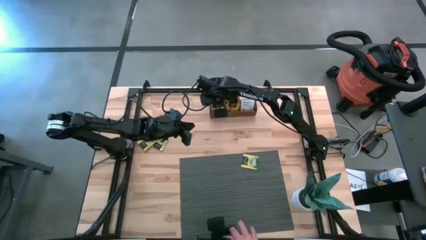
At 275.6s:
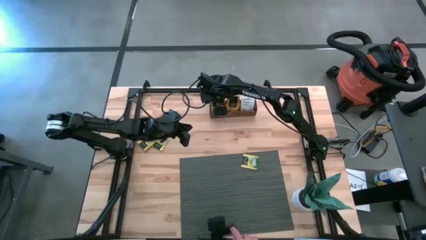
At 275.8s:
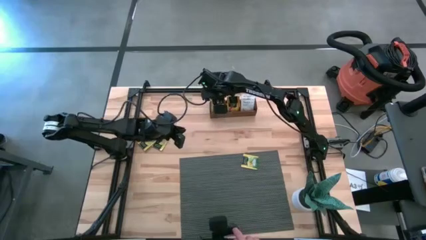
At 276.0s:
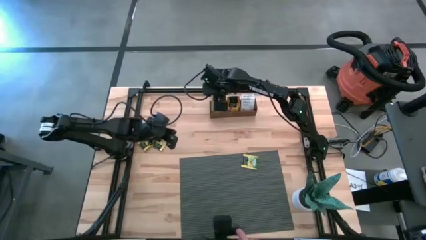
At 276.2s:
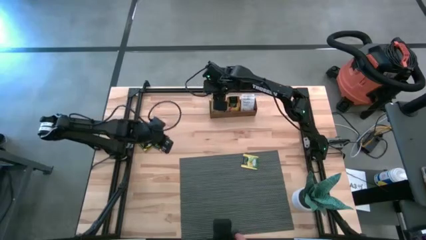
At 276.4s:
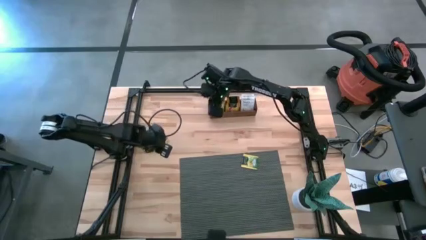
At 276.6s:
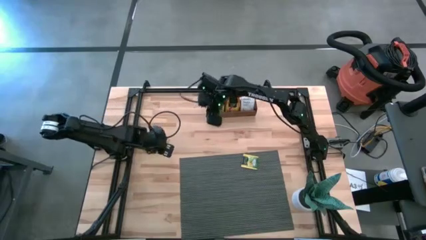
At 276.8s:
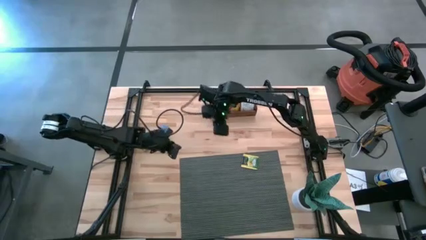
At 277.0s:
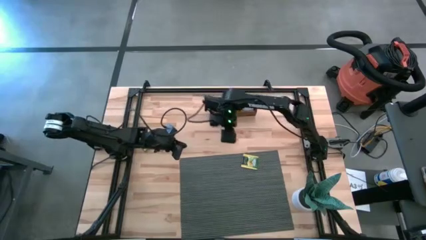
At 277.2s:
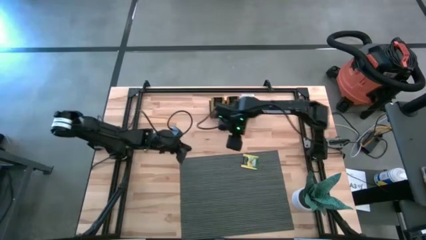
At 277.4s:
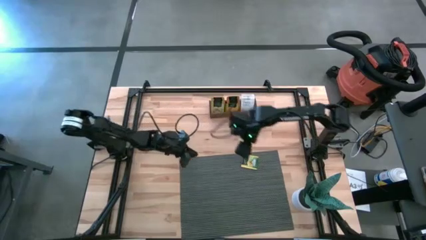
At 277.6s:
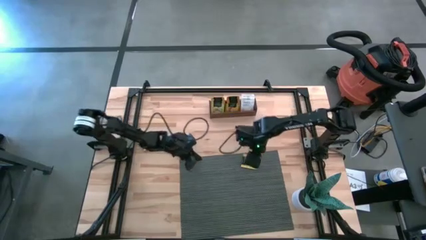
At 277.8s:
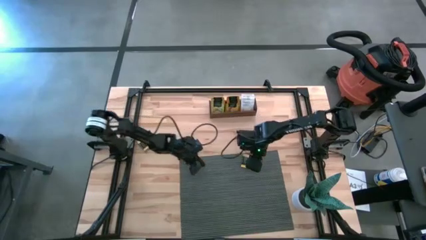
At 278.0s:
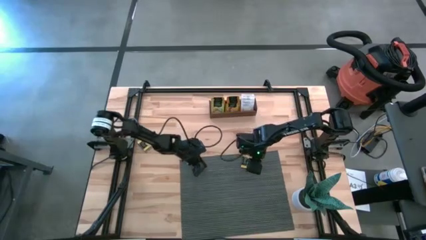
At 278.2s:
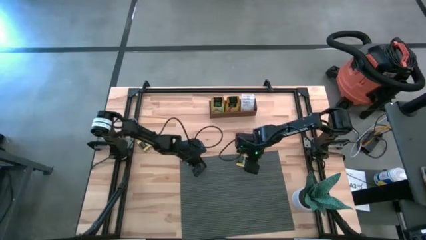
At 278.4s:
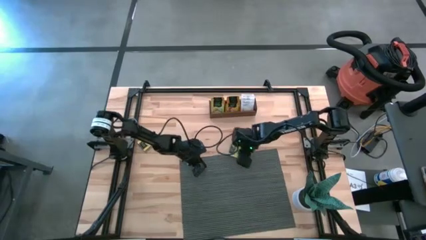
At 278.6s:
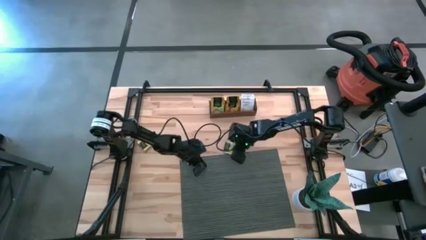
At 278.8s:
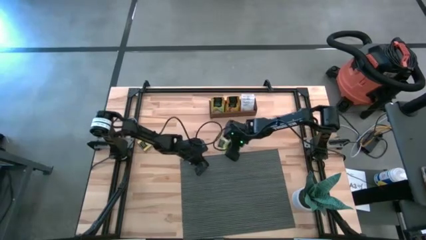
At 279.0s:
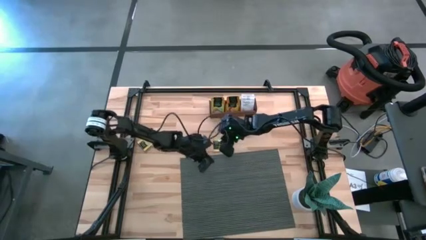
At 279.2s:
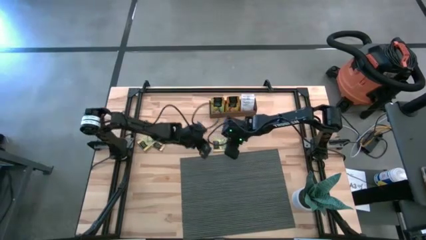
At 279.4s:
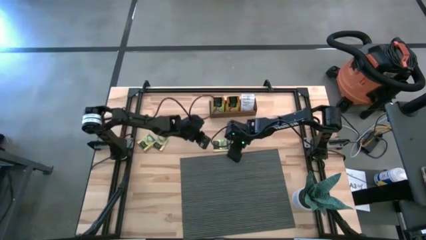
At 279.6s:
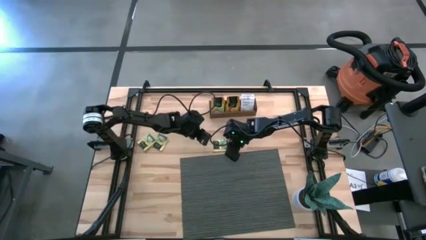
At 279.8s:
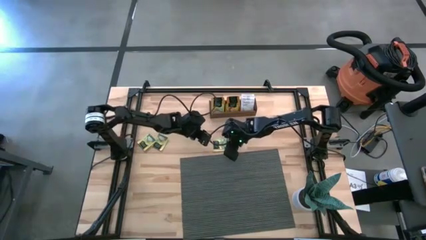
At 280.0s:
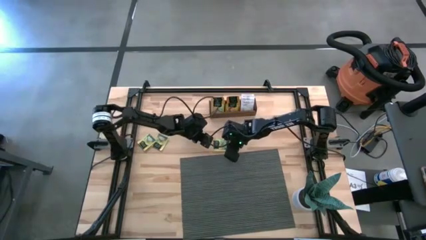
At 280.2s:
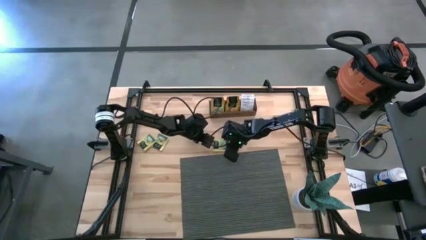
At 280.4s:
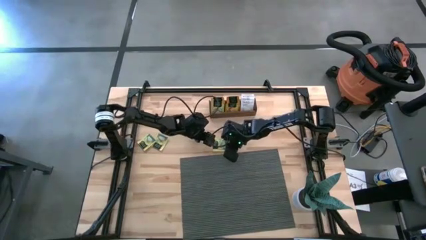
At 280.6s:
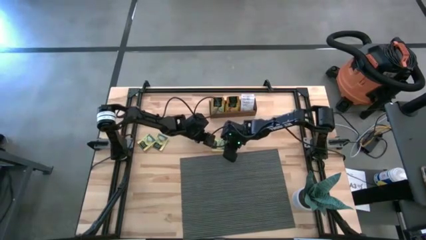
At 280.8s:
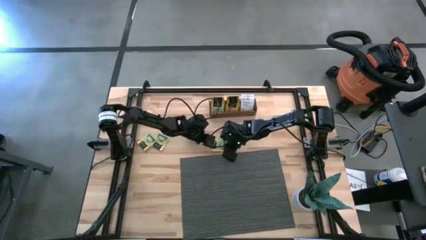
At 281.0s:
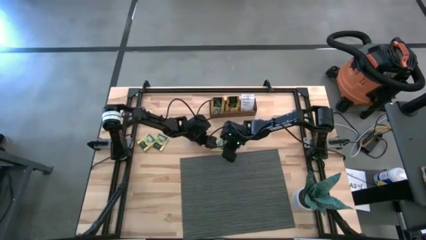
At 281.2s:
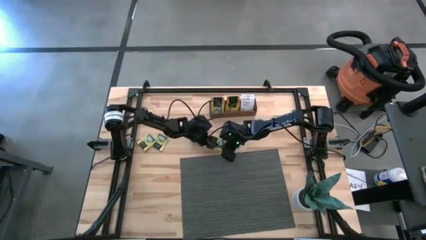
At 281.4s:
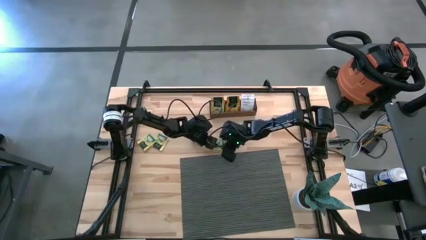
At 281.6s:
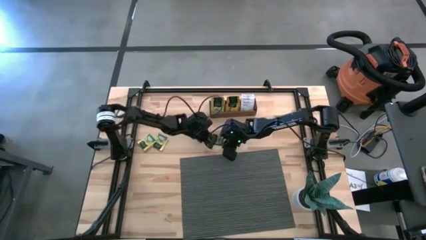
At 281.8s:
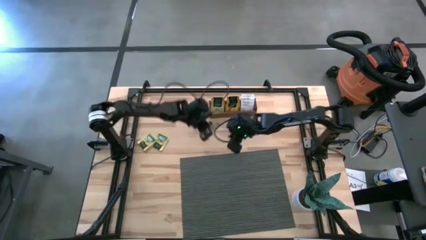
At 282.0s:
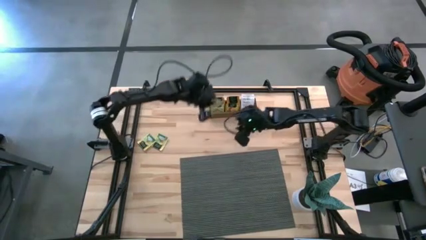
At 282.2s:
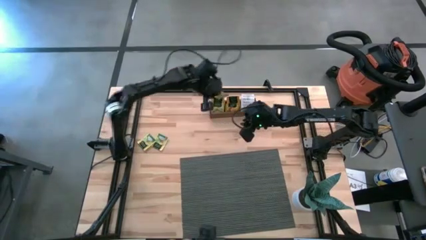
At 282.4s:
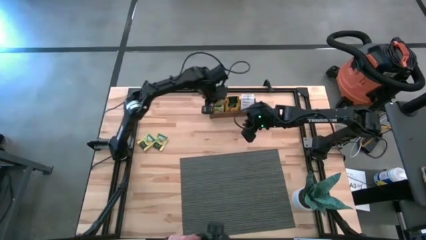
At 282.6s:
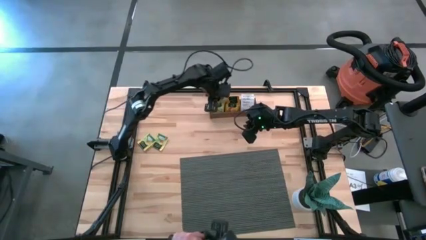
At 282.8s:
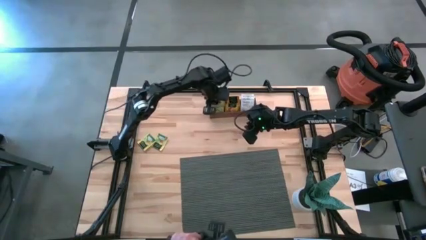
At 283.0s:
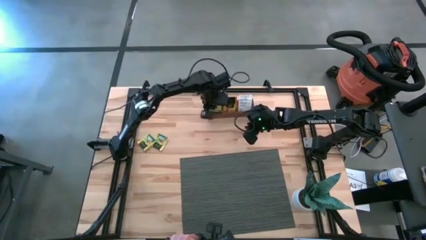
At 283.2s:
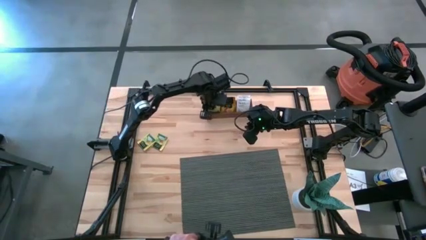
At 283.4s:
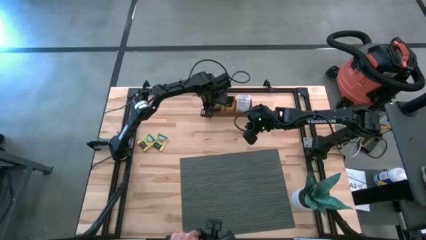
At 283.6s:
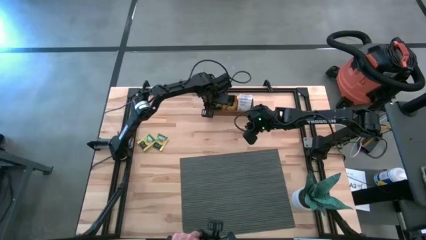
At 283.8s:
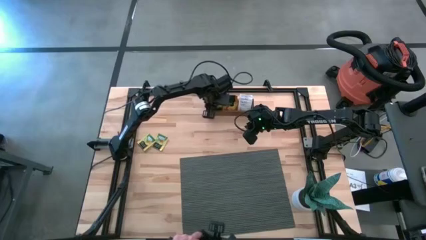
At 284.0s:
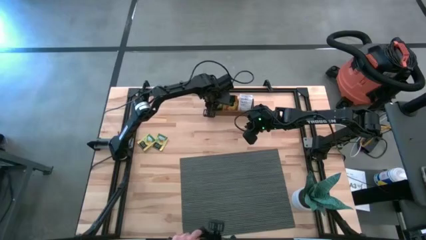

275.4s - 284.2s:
Task: Pick & Place Tea
Put the yellow tea bag into the left section of the wooden organizer

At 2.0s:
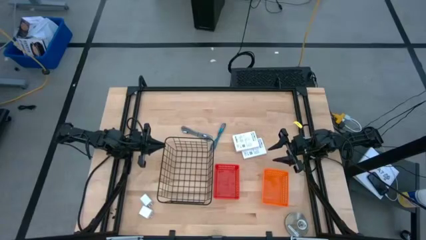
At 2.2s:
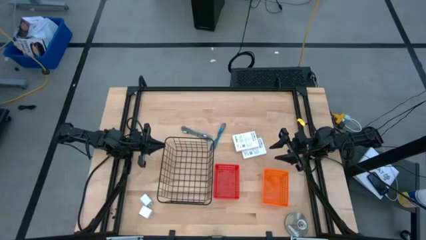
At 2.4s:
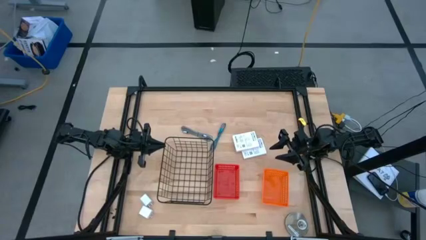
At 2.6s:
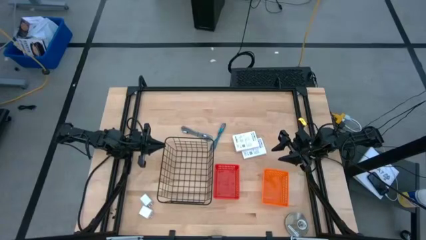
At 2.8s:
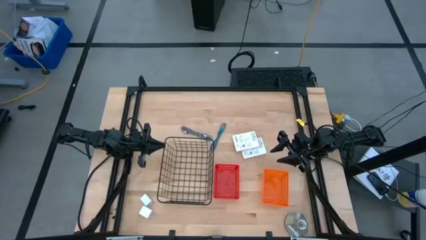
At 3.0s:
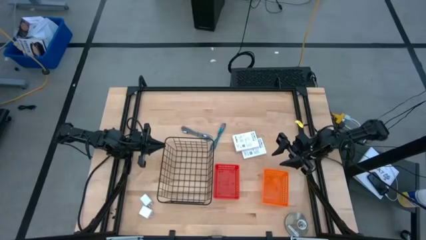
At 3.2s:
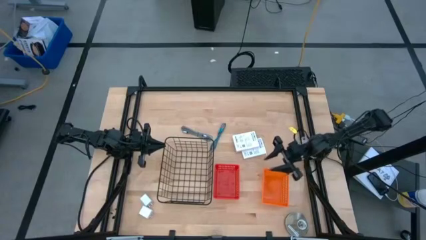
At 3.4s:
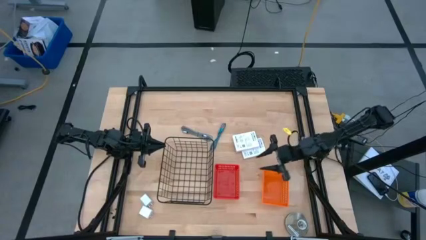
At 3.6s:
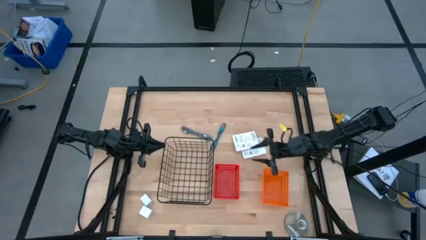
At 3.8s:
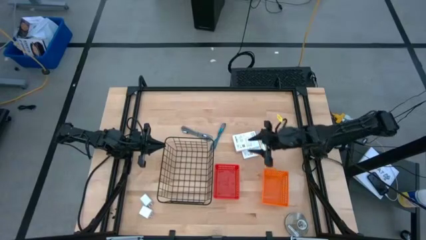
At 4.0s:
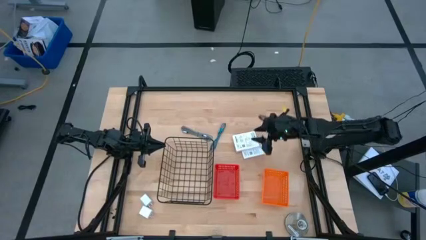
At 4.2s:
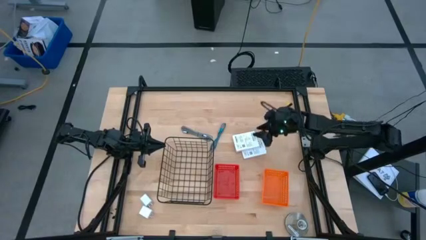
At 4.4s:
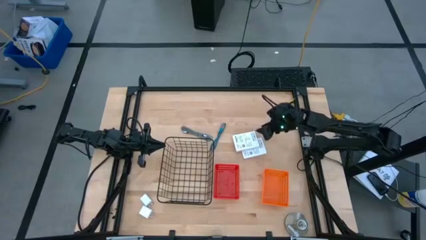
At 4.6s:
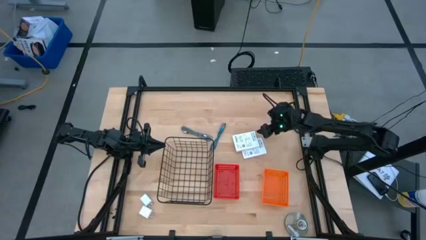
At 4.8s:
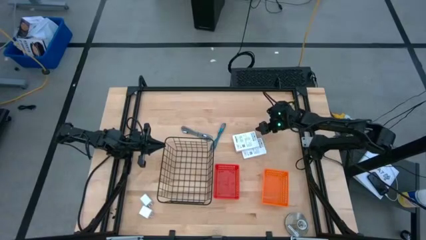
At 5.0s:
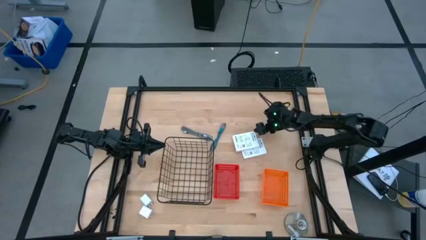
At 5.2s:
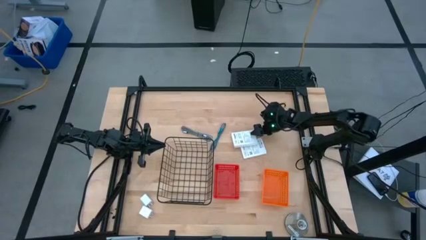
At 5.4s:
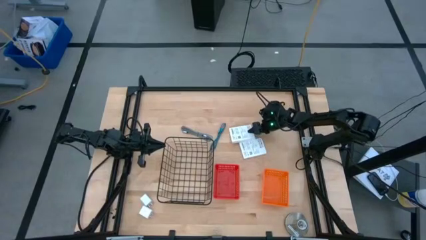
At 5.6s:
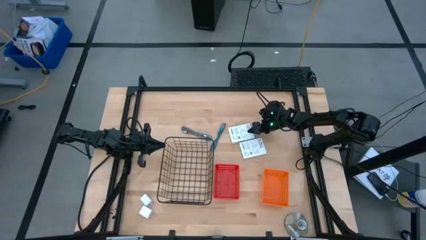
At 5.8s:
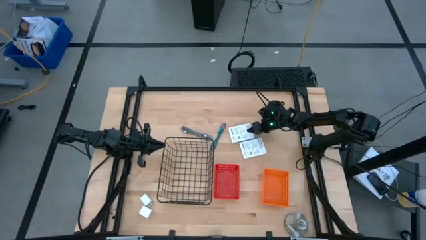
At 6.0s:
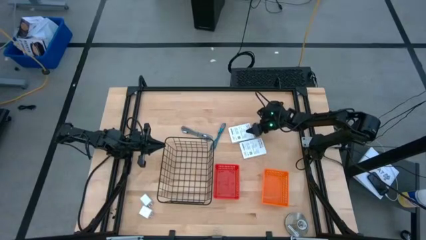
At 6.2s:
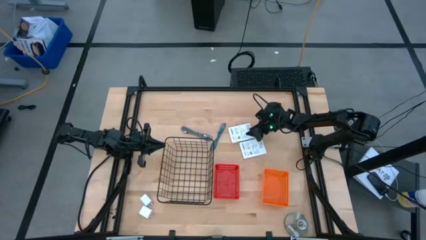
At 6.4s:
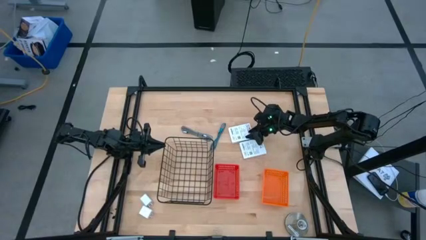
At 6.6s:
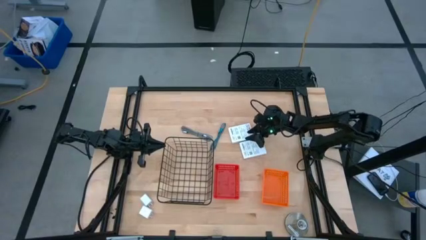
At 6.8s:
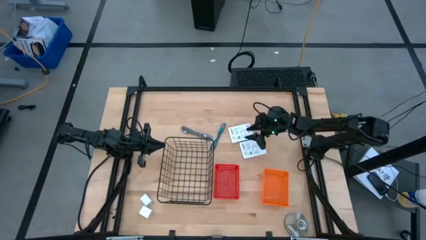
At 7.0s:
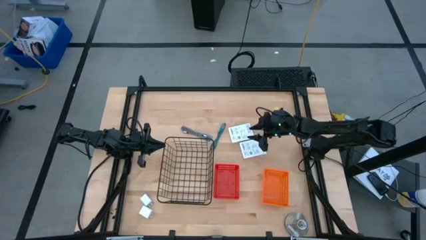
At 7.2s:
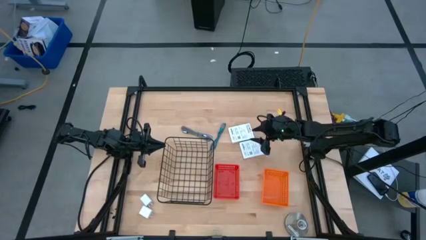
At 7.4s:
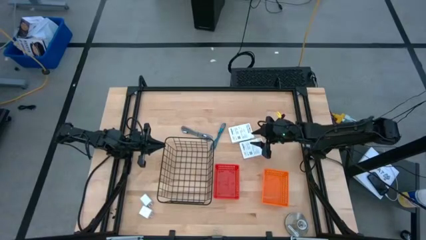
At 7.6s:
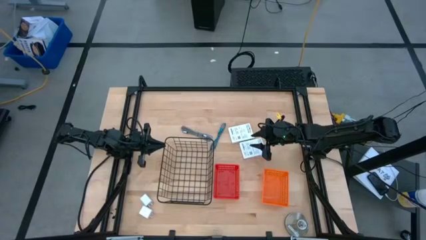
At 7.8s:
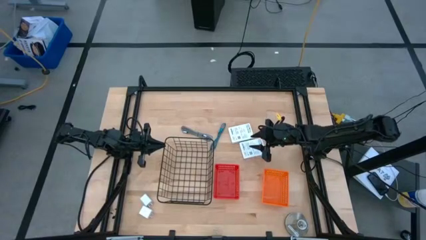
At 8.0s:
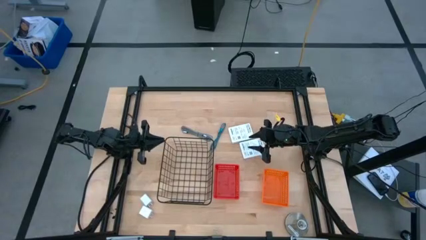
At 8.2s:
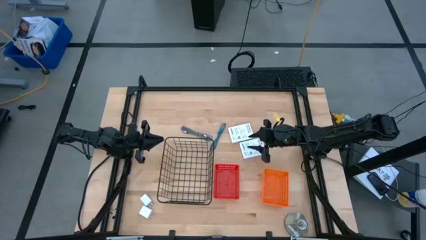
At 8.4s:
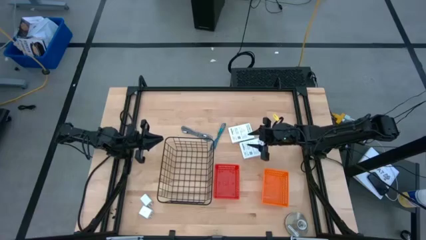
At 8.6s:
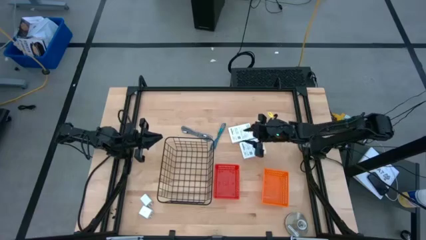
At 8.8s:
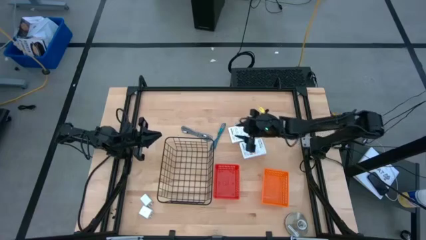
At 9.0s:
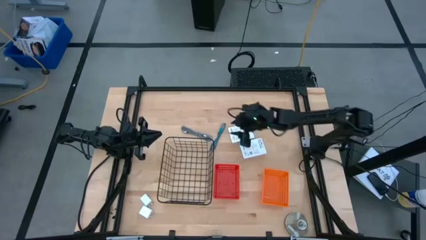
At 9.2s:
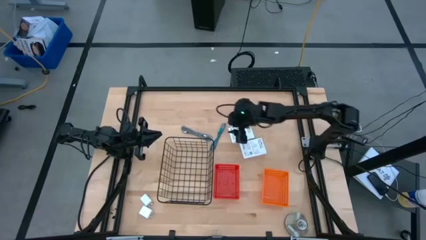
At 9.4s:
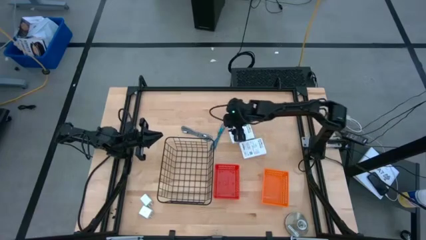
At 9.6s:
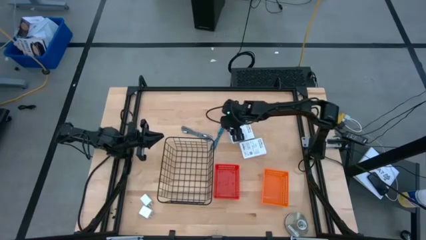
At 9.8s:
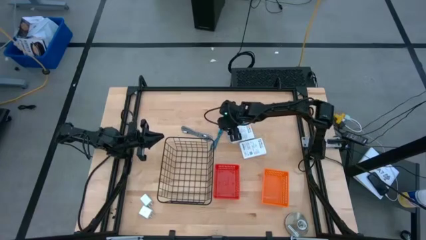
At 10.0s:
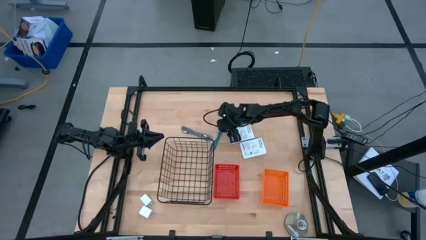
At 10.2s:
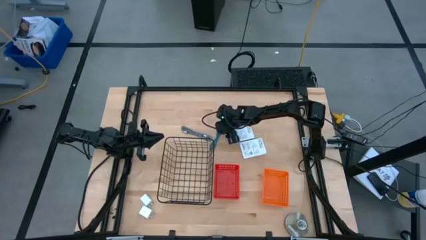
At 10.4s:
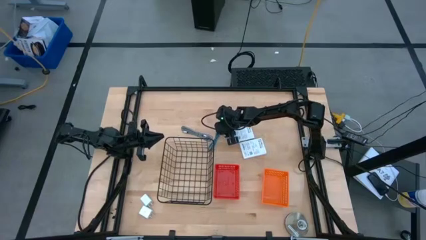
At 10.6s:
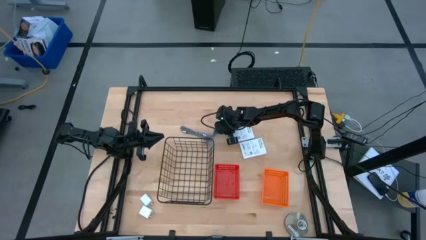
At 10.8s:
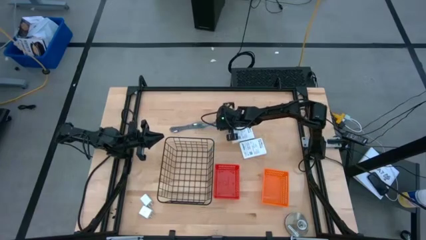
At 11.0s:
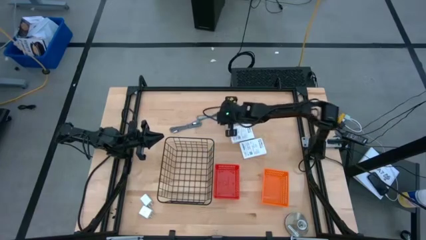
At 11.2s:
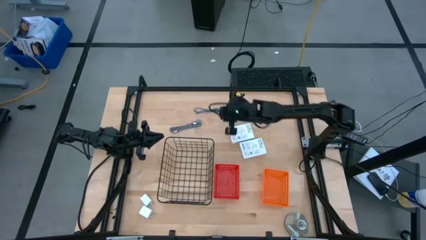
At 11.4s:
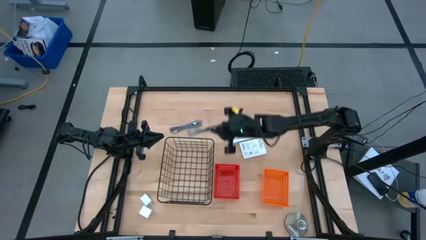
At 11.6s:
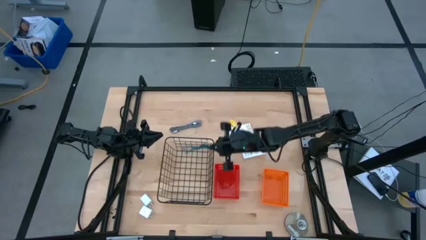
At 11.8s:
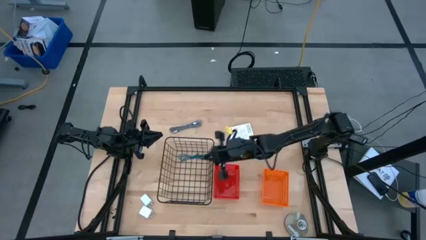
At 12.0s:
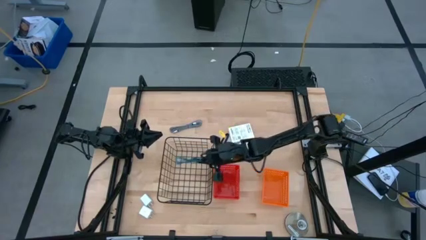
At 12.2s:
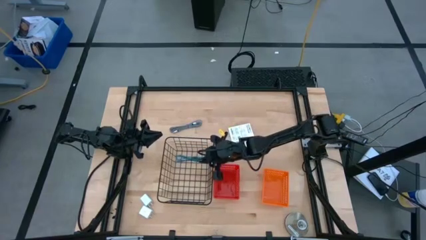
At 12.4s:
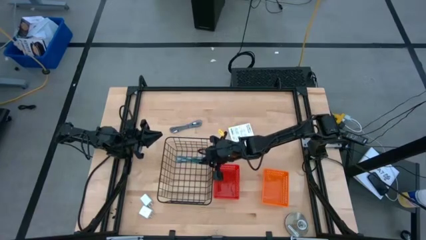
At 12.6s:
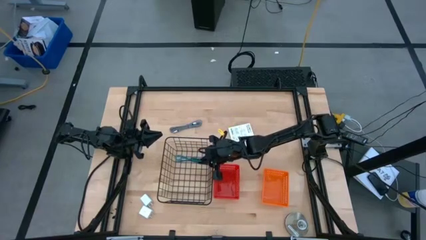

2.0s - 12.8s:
Task: Pick and place items into bin
Put the blue charger cable into the wire basket
